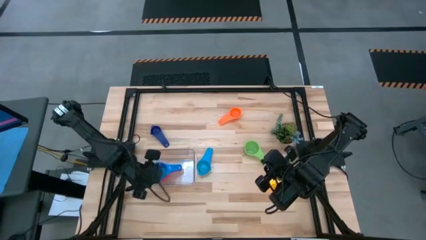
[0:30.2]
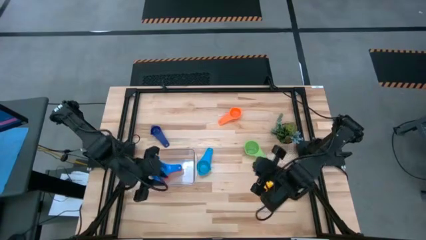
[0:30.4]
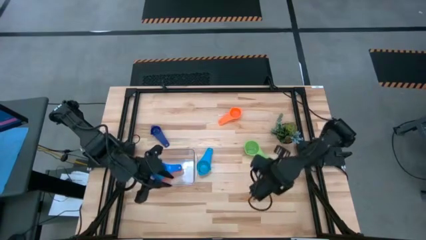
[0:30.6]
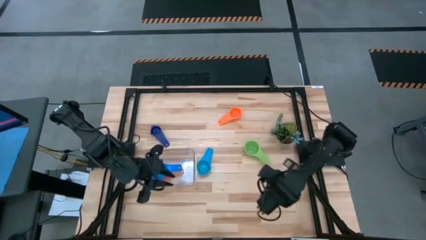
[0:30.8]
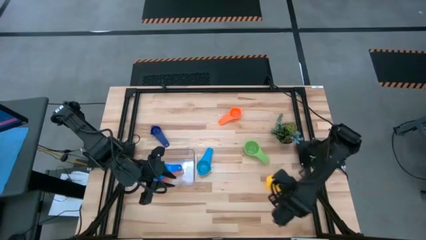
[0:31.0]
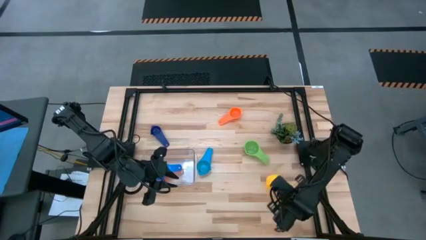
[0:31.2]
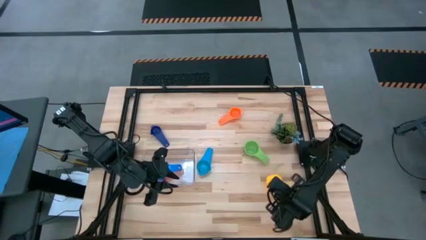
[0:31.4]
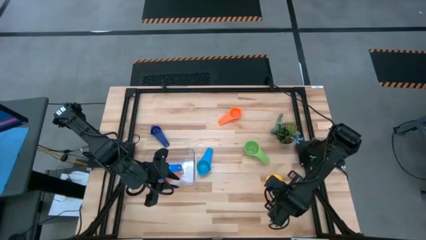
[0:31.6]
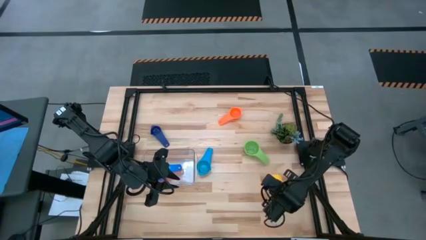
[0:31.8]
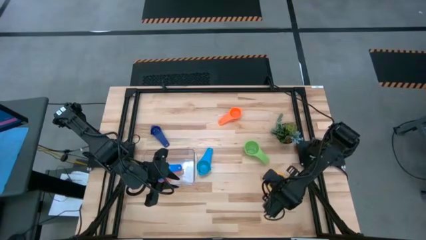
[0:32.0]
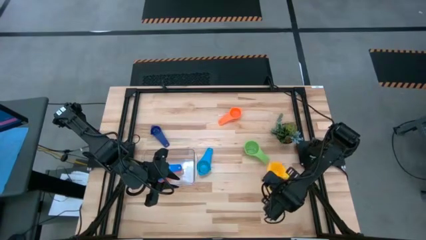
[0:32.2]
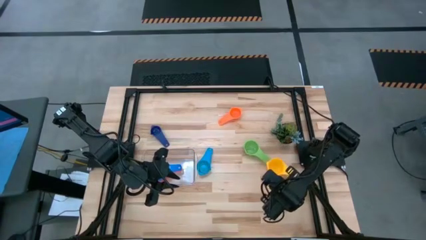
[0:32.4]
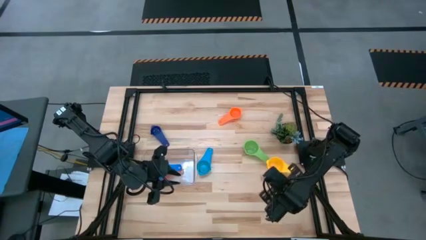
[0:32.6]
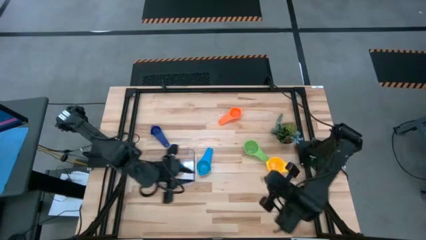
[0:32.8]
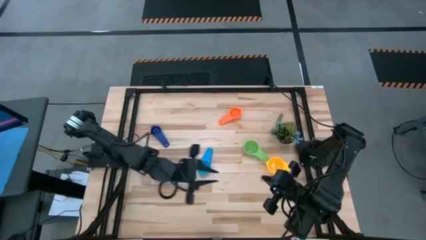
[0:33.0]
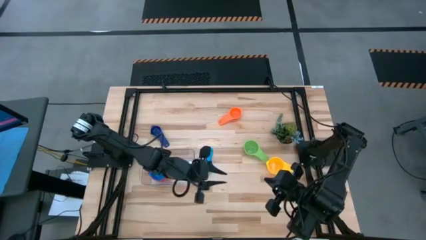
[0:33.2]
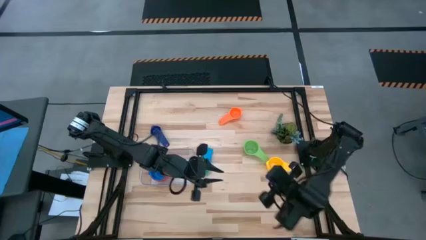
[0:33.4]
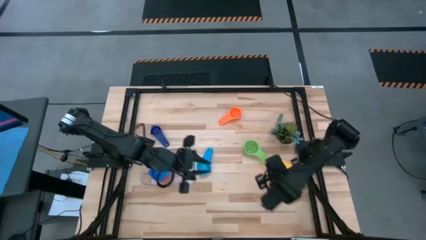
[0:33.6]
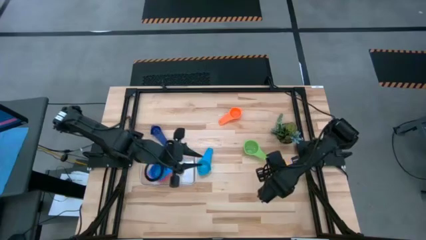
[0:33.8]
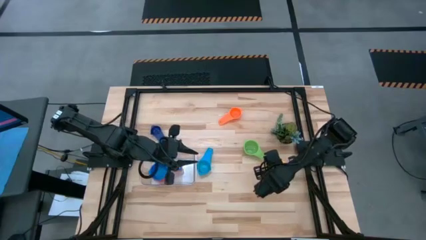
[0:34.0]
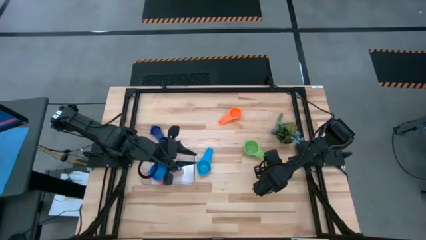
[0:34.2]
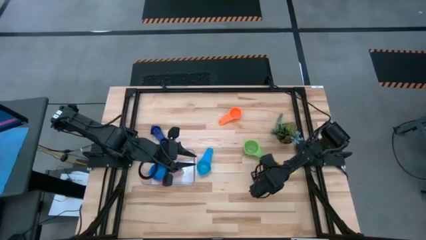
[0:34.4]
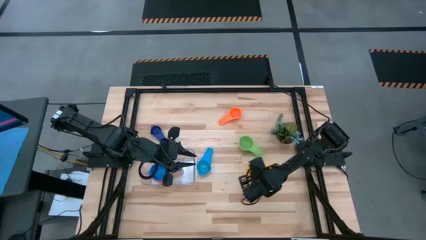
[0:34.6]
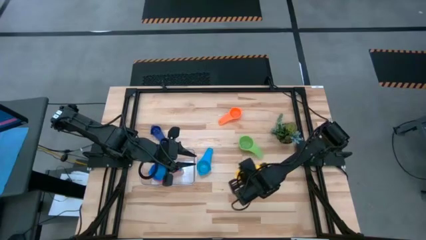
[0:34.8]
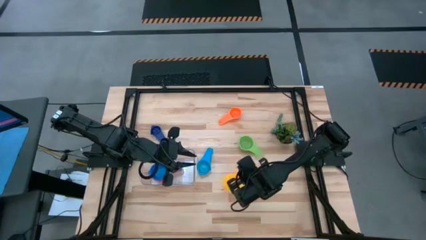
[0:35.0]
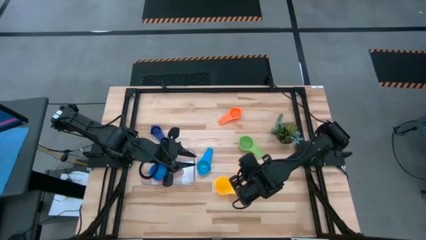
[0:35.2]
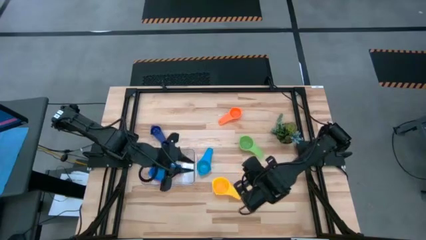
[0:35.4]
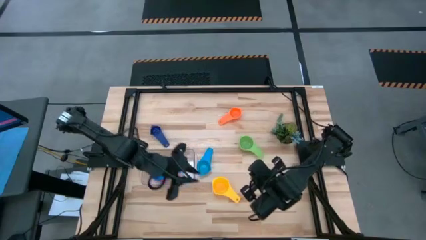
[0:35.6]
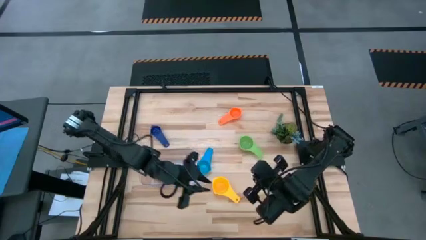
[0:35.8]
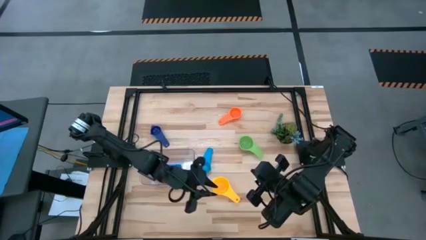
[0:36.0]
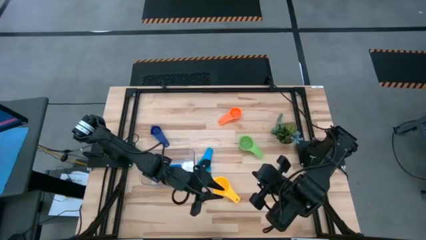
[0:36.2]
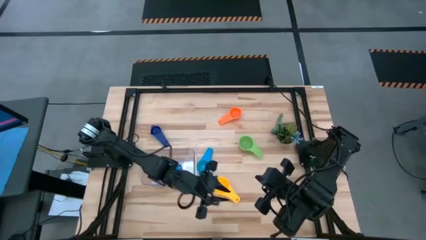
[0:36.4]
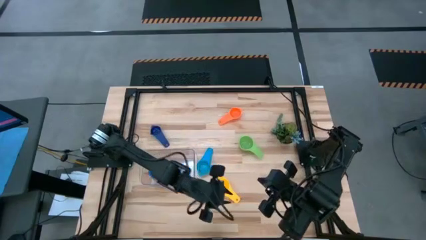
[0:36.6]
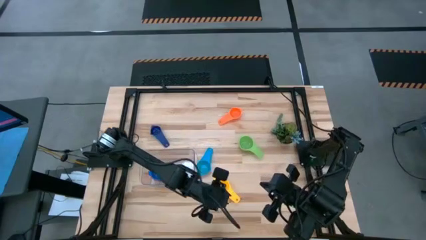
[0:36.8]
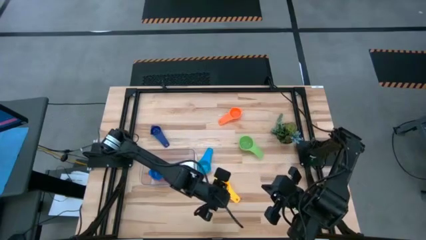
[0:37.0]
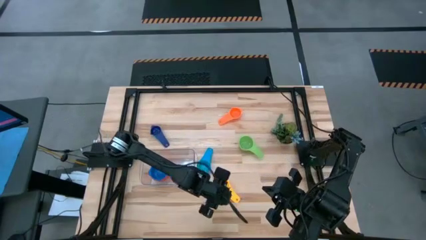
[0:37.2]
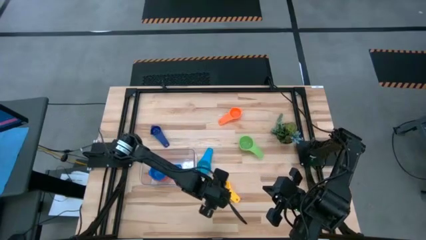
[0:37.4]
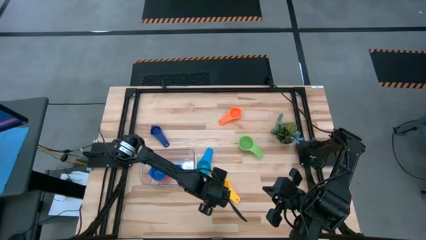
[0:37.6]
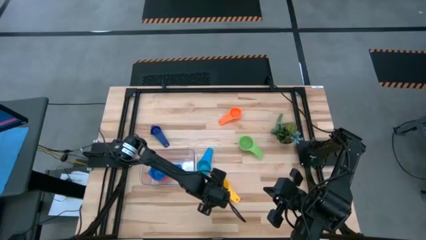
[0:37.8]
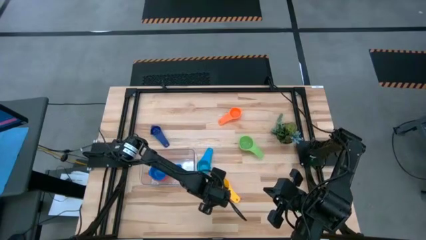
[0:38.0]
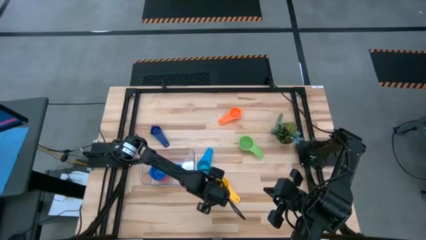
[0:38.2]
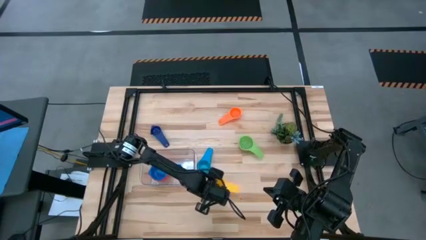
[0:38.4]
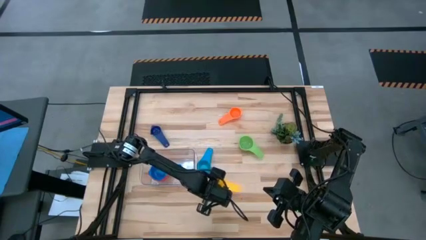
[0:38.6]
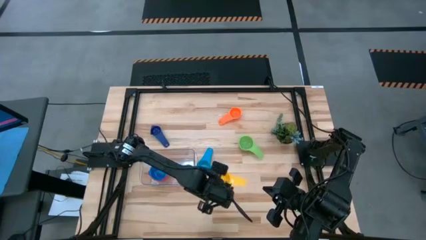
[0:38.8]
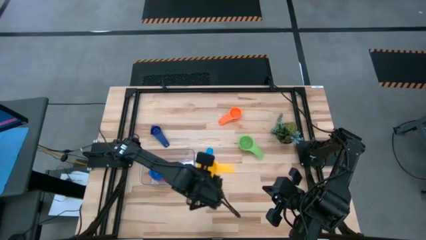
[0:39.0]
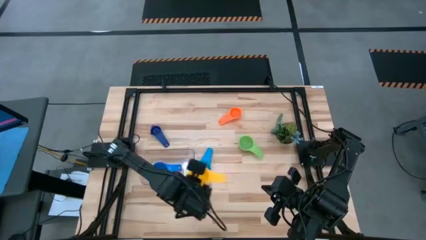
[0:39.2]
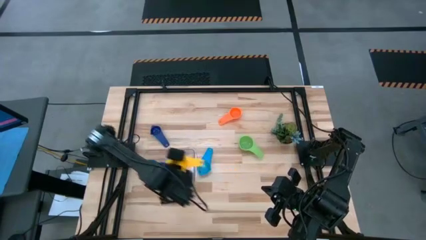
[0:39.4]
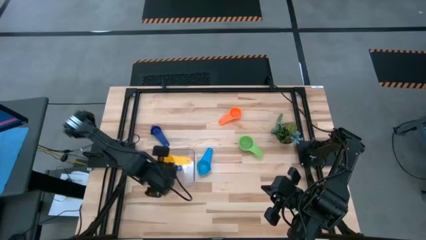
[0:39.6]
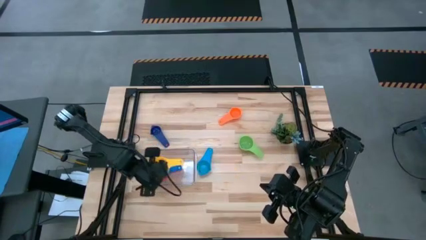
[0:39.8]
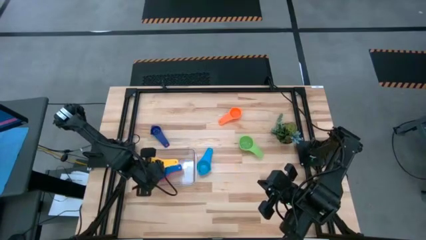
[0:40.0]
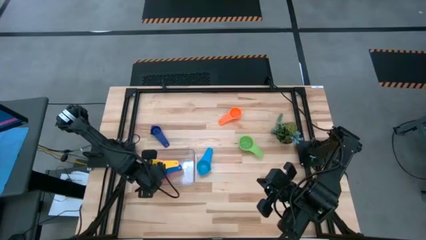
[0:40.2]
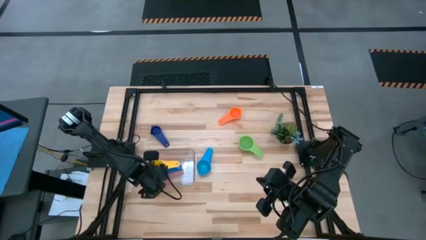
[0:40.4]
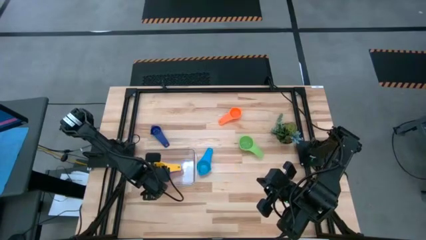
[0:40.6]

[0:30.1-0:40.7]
Task: Nest measuring cups in basket
Stack the yellow measuring cup on the blue measuring cup in the transparent bin
